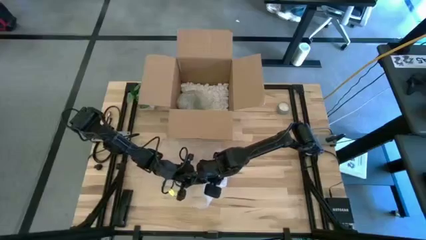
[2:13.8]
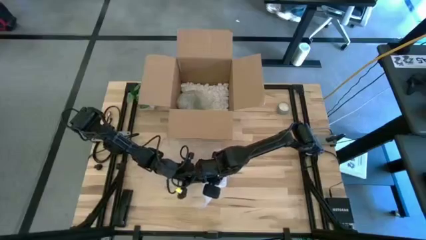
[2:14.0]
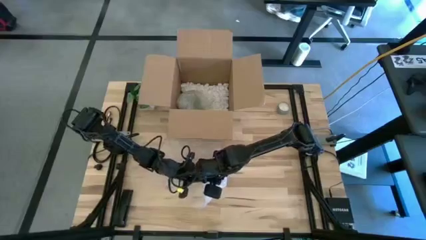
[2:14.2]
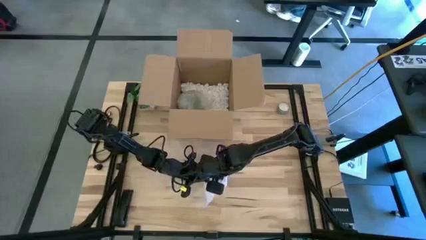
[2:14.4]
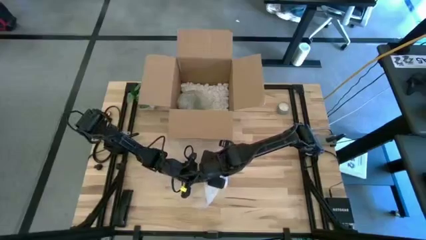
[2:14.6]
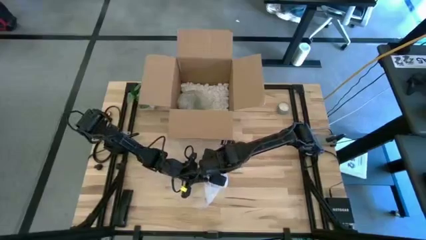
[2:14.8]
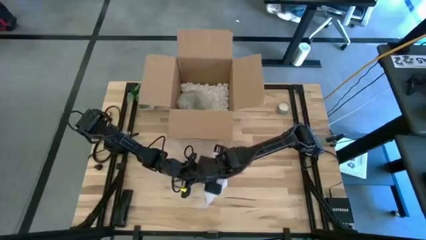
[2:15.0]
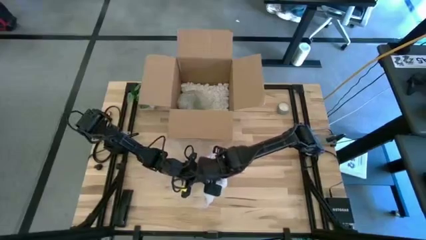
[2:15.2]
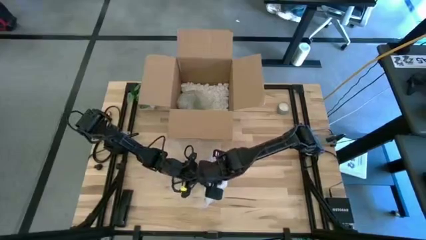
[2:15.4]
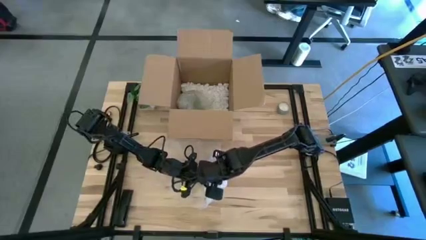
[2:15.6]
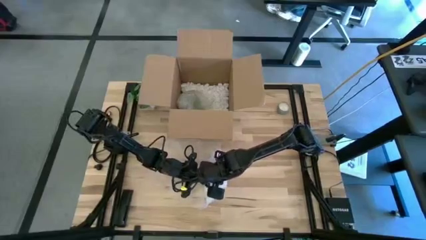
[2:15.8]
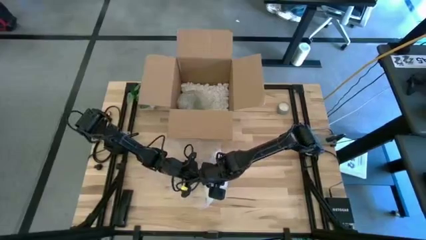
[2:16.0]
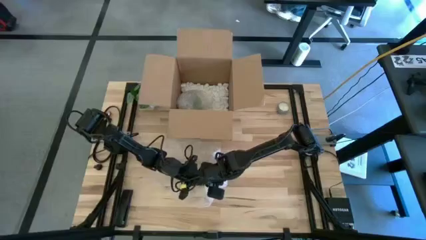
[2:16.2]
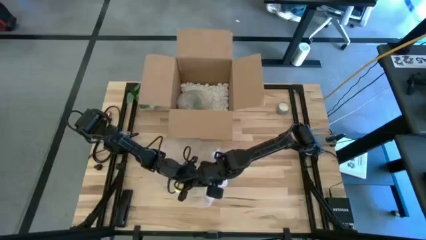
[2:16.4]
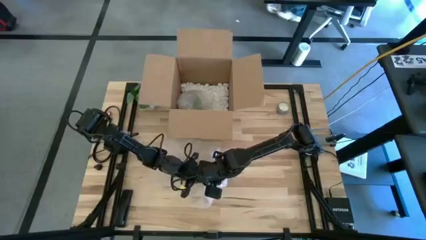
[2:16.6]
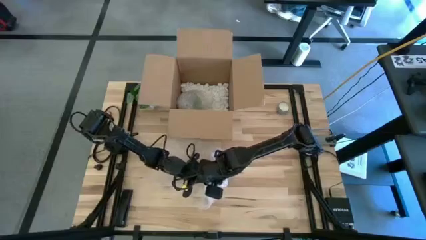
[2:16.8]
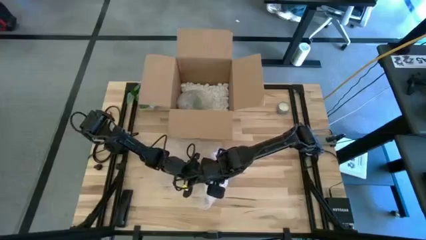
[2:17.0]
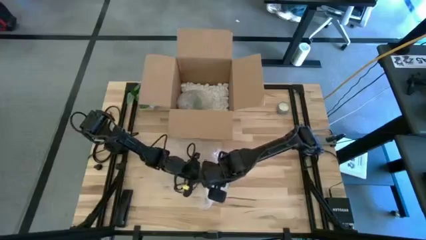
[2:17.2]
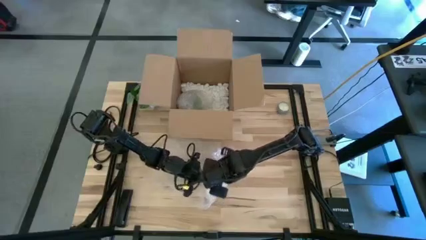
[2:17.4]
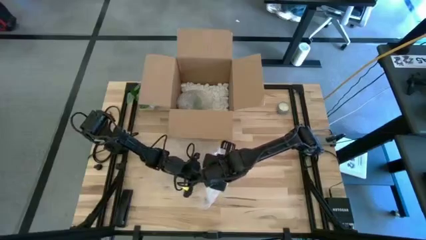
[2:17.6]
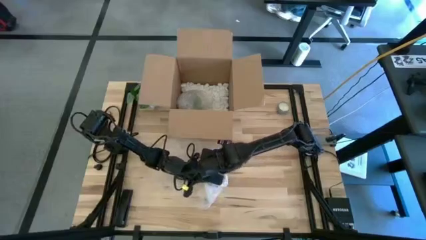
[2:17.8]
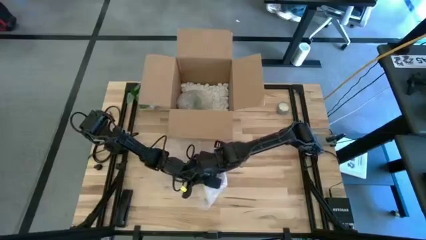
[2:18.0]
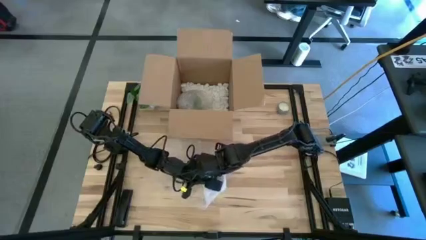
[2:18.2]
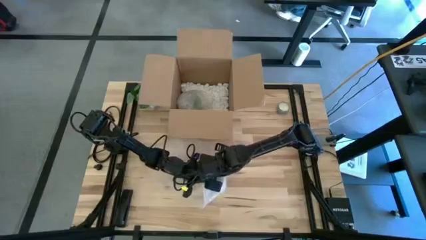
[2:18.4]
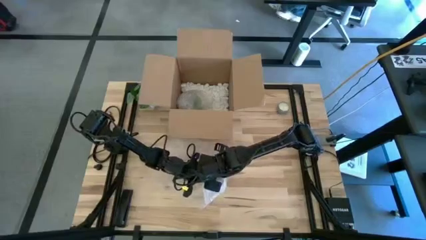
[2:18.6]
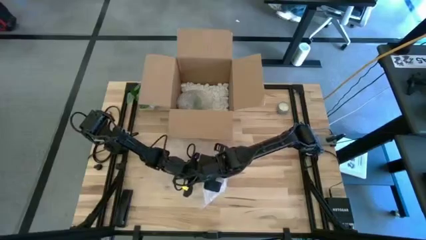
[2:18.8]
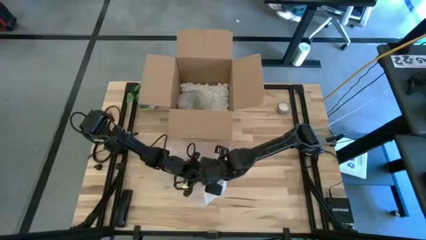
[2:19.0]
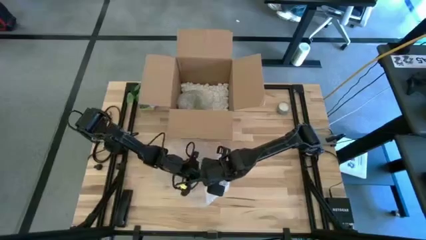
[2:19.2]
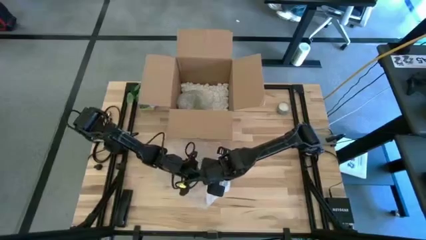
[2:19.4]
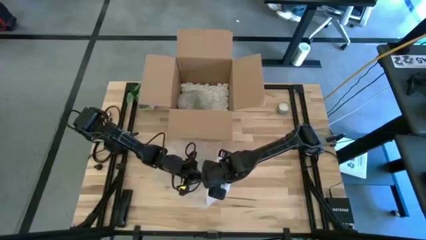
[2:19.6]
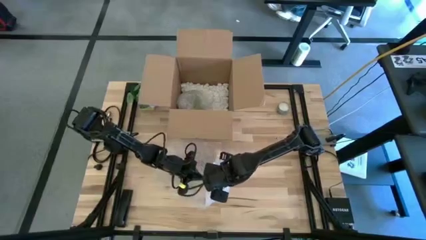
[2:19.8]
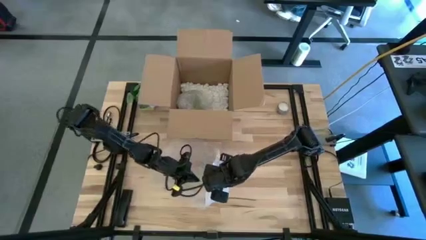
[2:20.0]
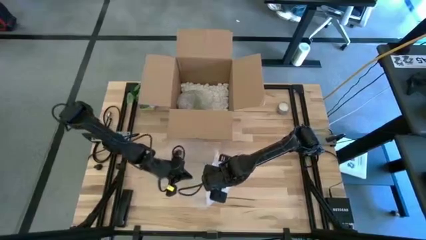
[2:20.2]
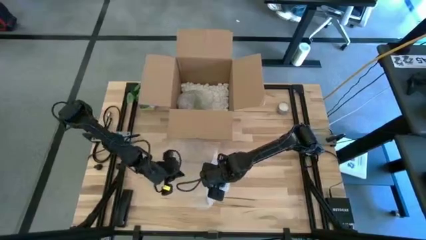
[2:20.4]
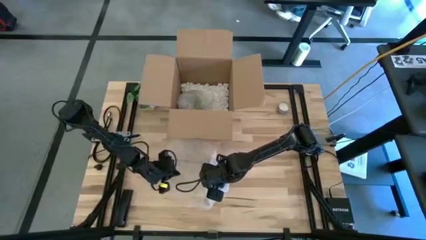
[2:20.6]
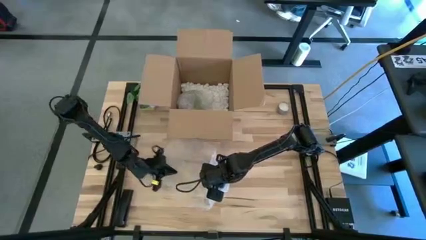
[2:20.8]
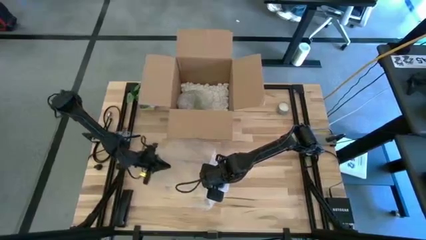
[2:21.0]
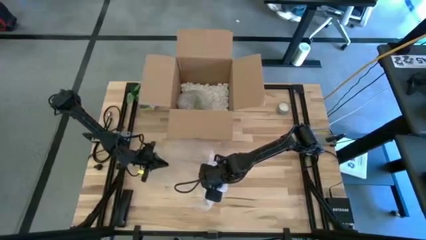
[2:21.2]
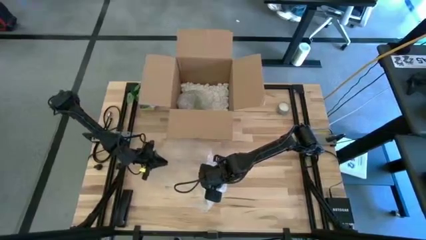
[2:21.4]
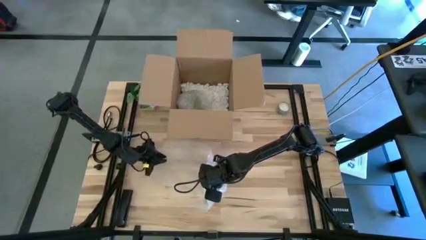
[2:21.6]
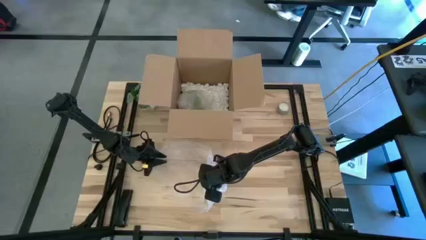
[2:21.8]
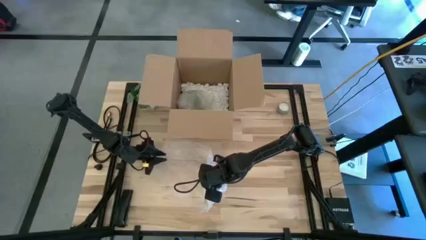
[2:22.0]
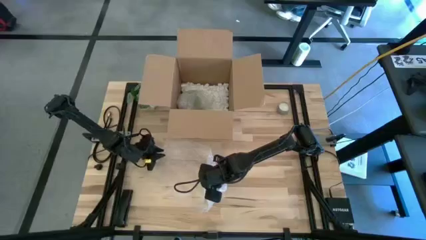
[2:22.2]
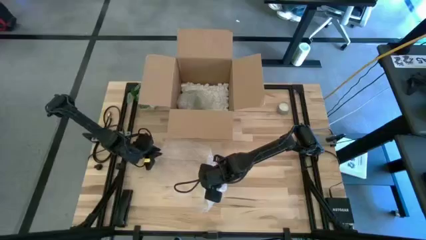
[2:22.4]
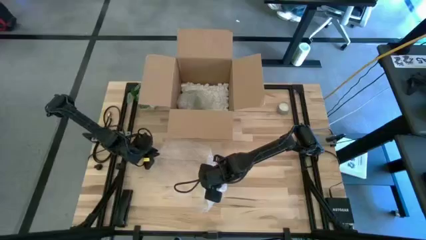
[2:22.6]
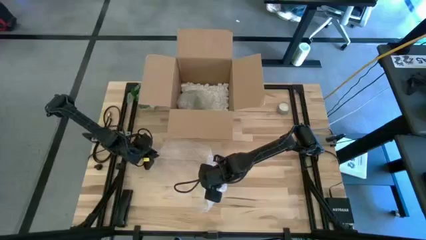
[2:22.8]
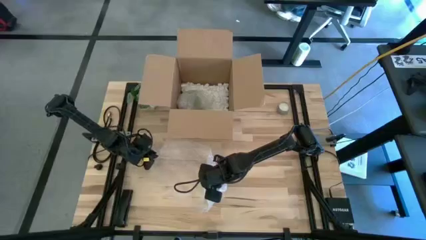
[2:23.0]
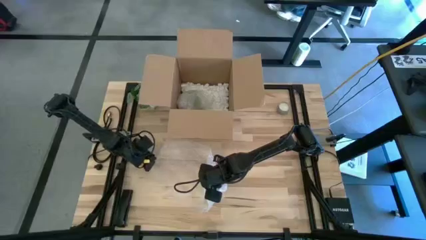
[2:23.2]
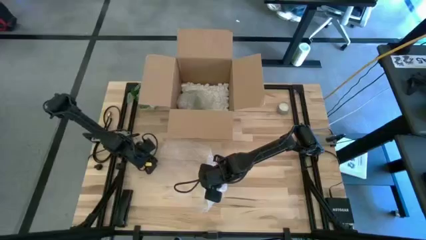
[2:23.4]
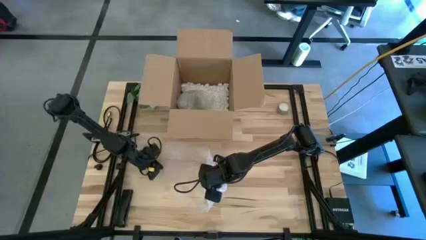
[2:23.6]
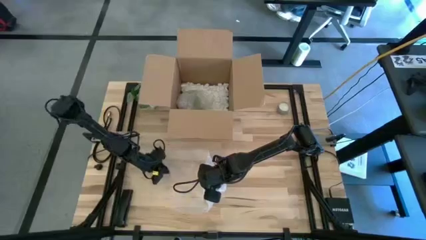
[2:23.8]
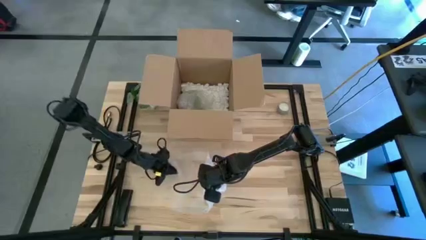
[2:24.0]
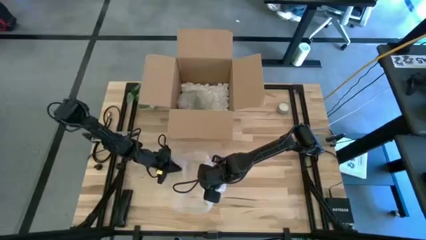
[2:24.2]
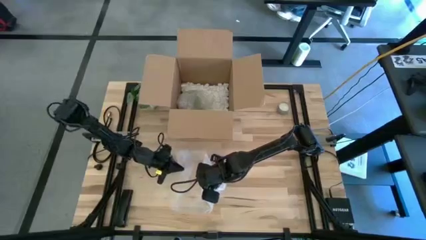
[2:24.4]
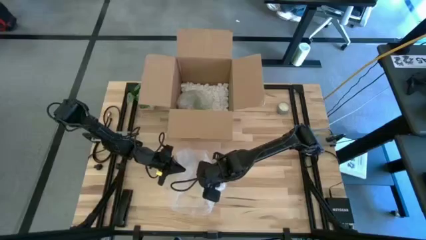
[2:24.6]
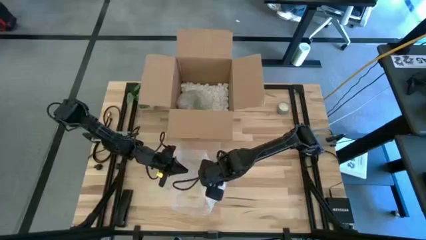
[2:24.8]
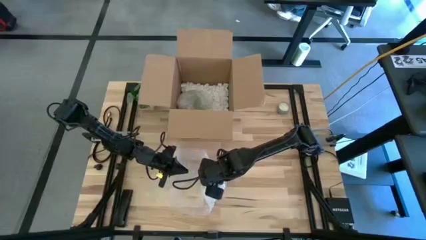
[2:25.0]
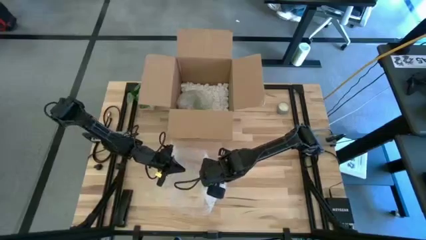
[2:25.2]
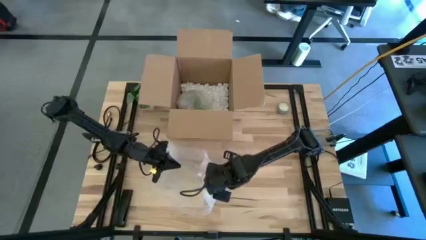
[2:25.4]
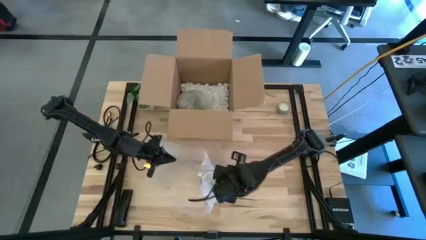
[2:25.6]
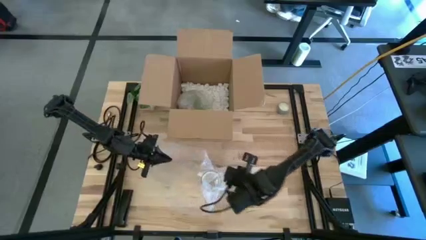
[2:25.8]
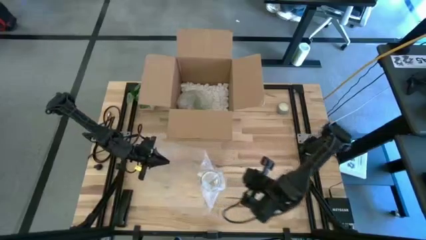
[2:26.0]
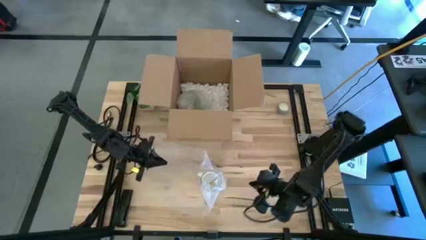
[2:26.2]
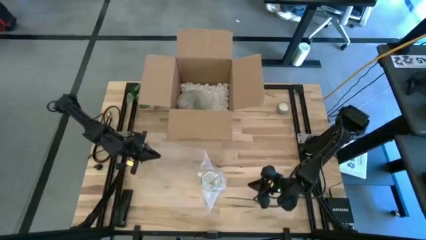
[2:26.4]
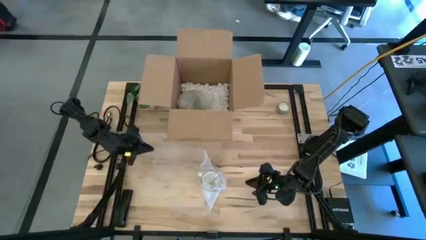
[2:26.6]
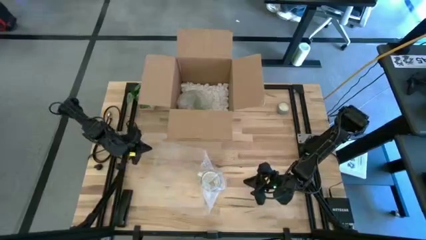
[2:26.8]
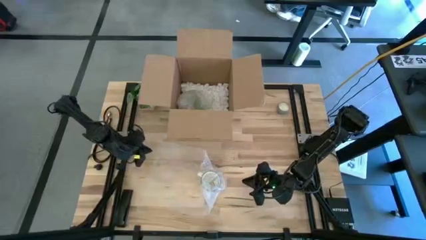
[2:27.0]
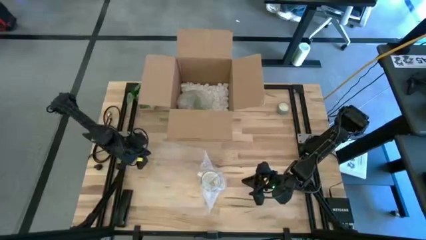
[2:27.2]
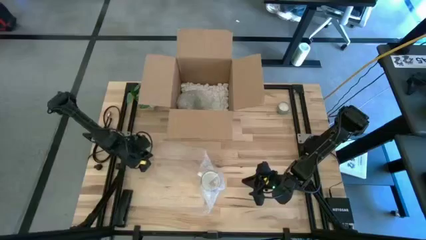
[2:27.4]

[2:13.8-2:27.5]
Task: wrap mug
Wrap the blue mug with the bubble wrap

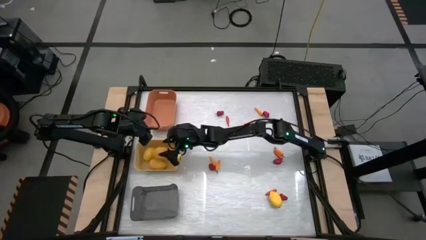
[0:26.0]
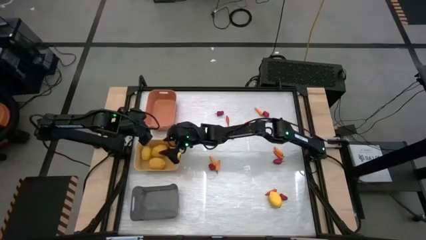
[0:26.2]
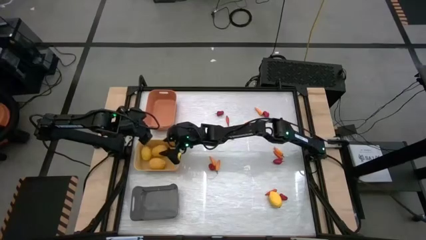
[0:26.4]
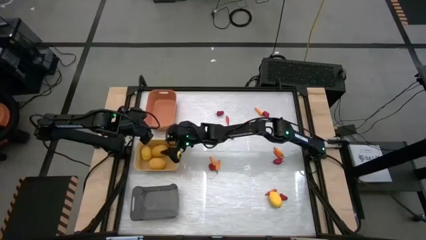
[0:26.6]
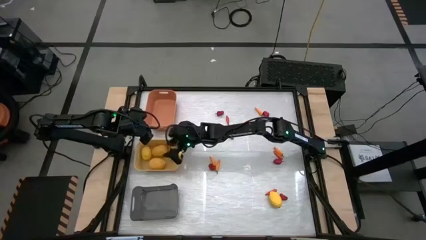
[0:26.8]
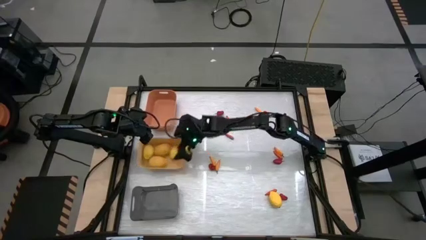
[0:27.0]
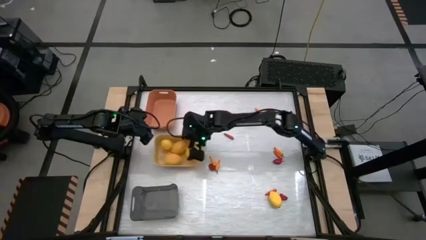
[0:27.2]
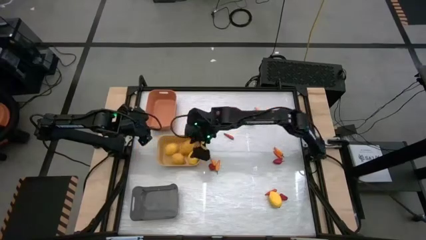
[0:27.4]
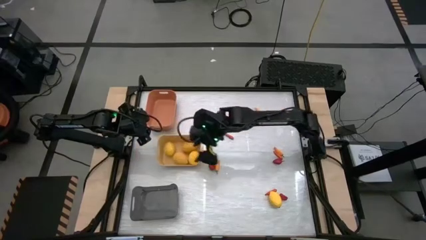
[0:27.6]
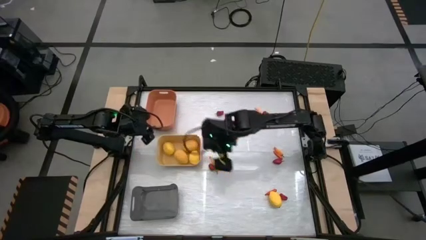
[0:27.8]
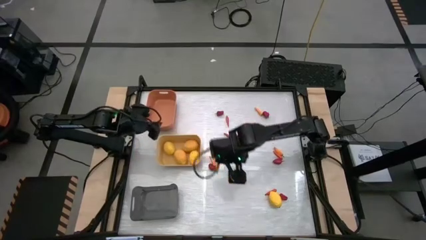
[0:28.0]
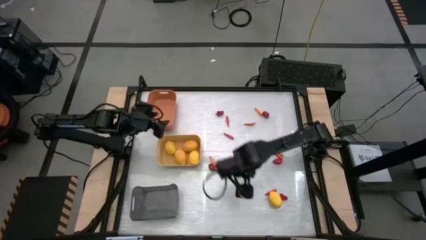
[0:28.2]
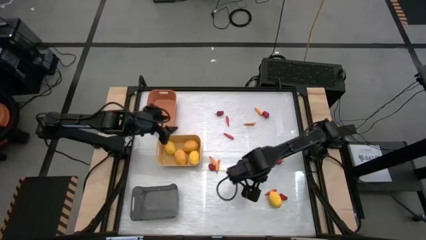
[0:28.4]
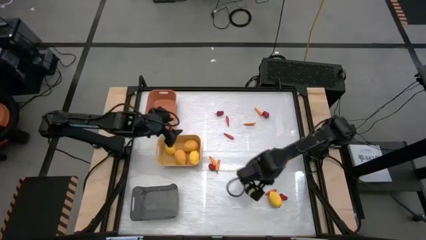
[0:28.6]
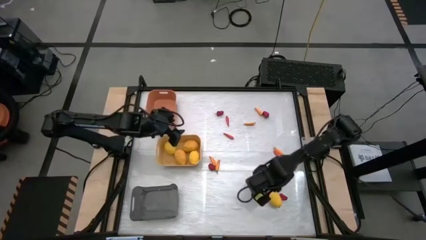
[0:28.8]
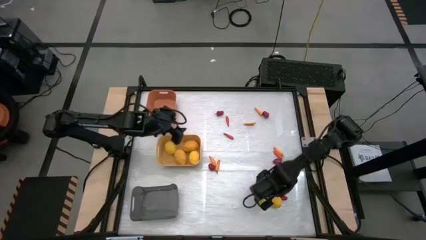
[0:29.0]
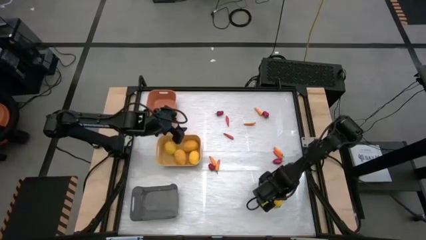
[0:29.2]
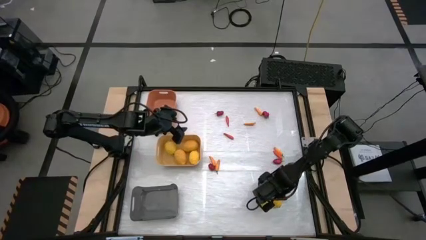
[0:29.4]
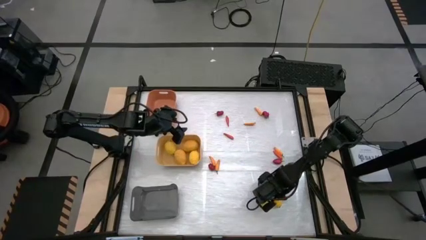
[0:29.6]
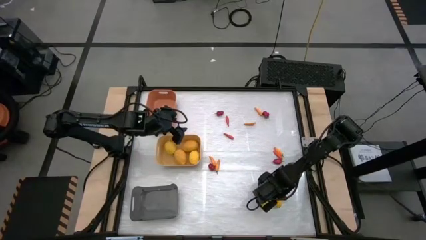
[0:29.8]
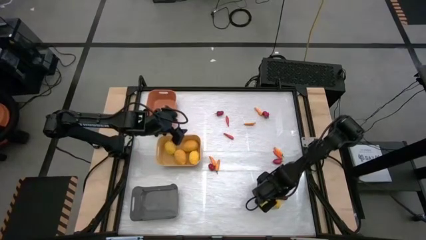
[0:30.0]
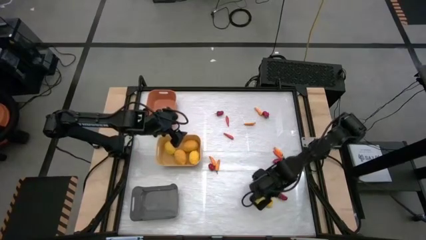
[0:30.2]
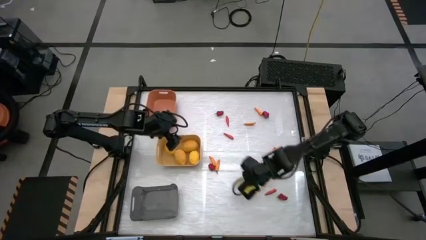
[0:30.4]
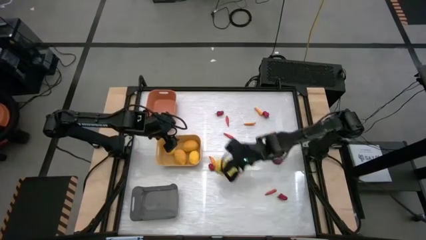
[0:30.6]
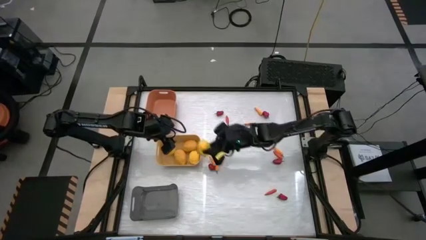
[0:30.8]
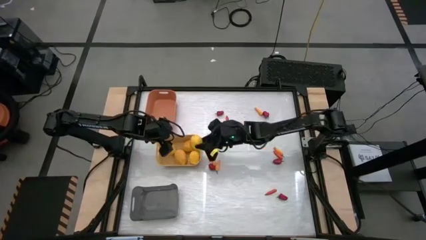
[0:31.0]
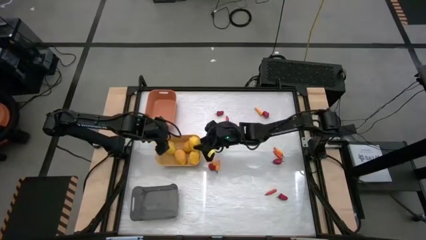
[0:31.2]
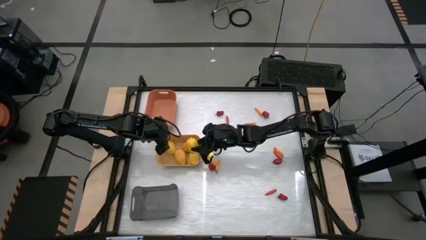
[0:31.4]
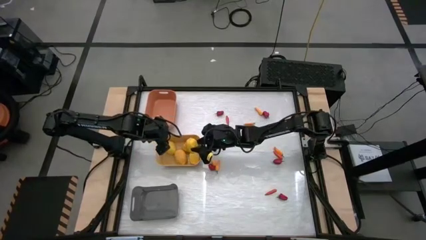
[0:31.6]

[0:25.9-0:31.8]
Task: Sort produce into baskets
Put the yellow lemon into the yellow bin
